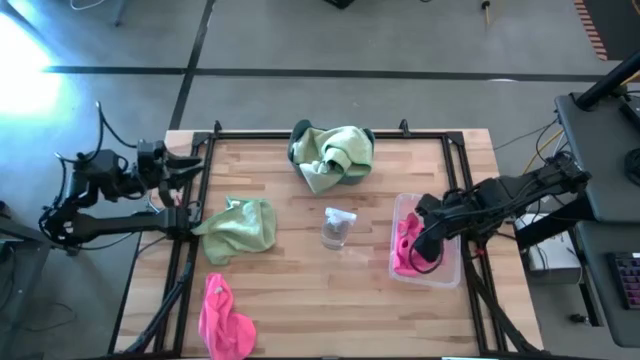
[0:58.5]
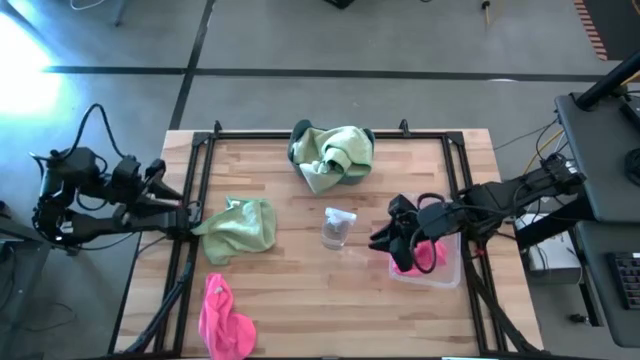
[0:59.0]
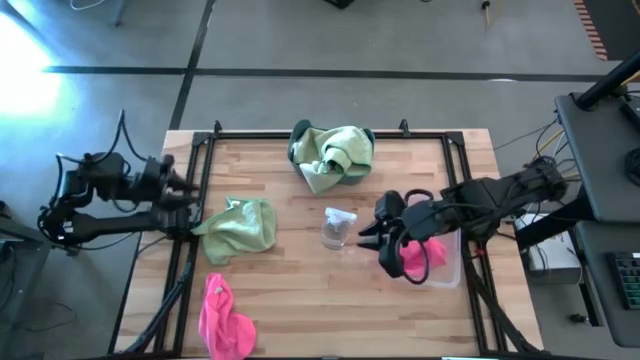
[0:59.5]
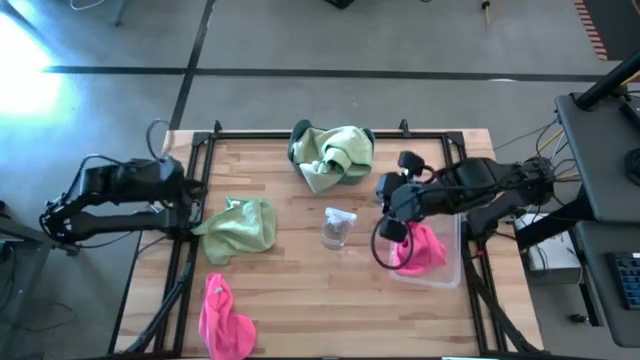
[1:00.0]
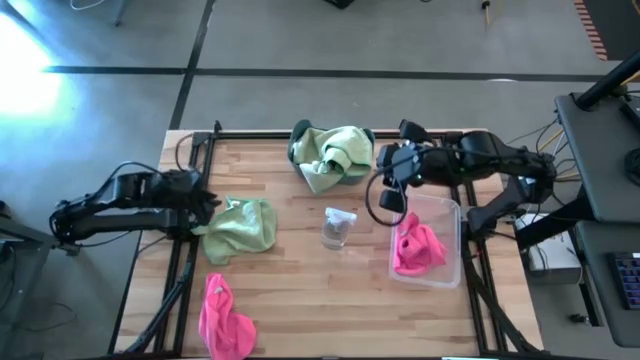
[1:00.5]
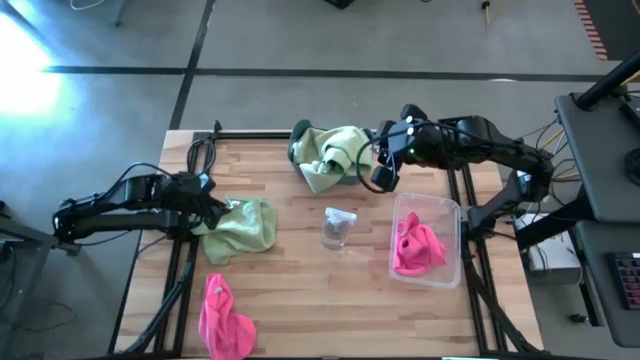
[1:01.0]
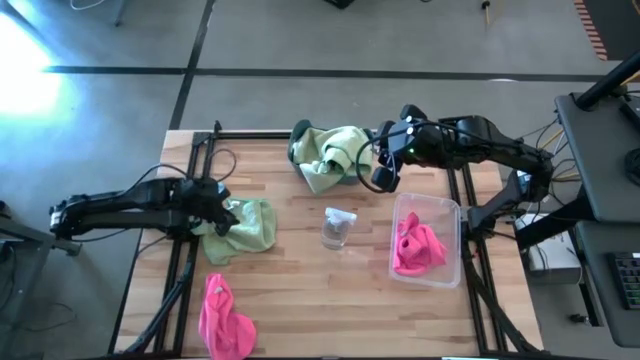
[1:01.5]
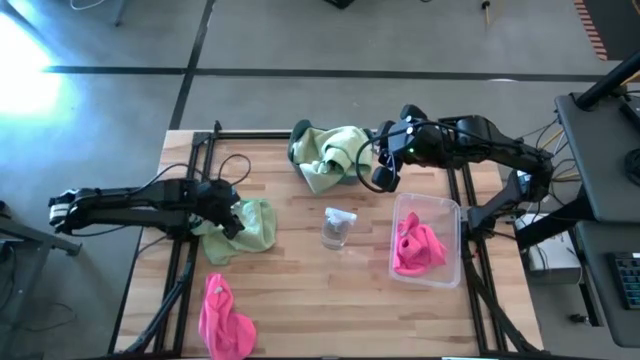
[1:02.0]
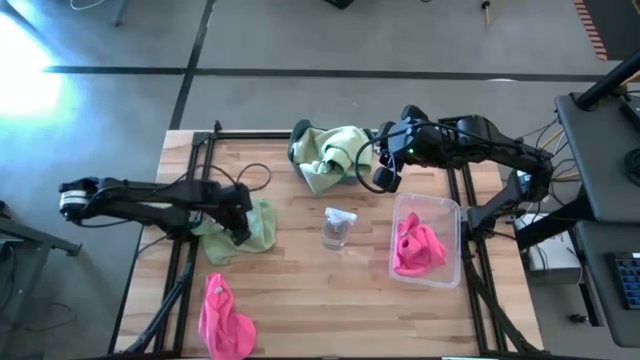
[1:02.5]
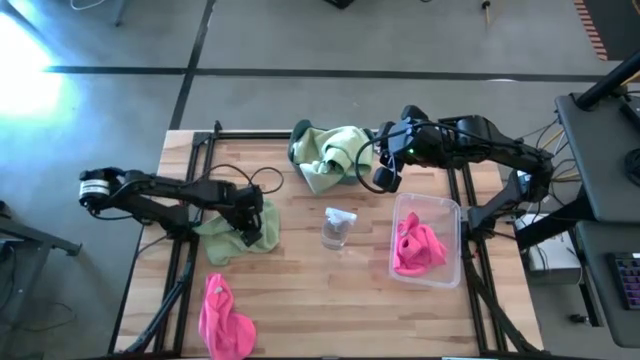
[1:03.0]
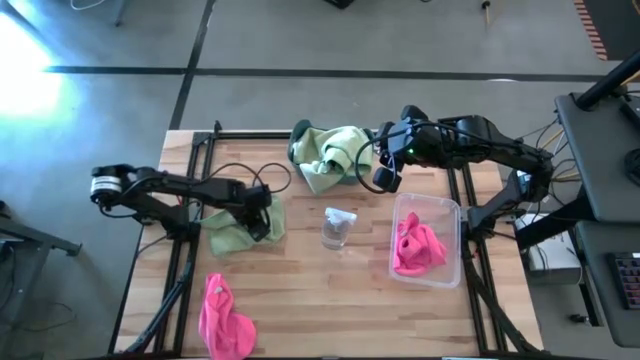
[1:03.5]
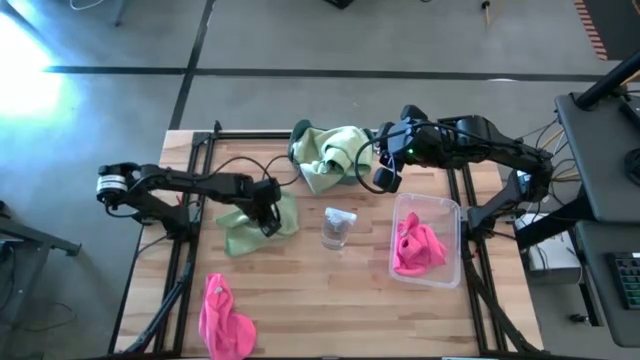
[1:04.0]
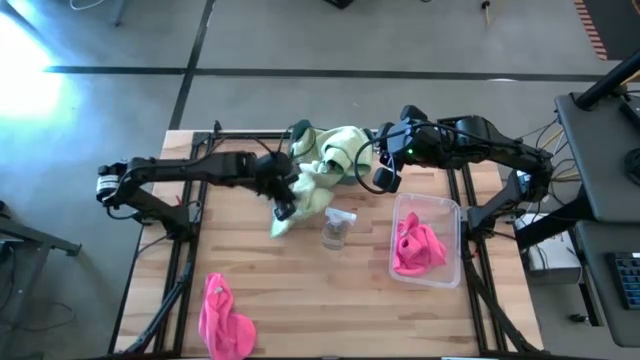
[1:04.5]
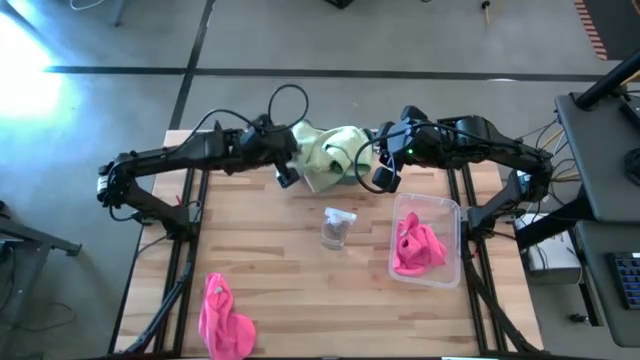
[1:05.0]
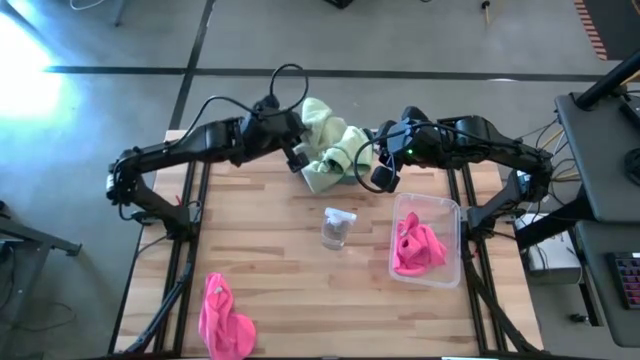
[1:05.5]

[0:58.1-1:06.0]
Task: Sort microfiber towel by color & place in baskets
Put the green microfiber towel into the blue bin

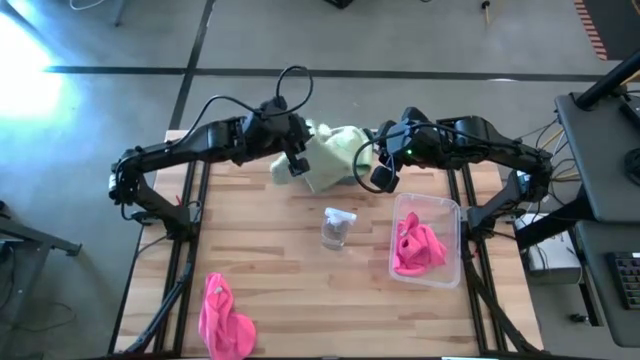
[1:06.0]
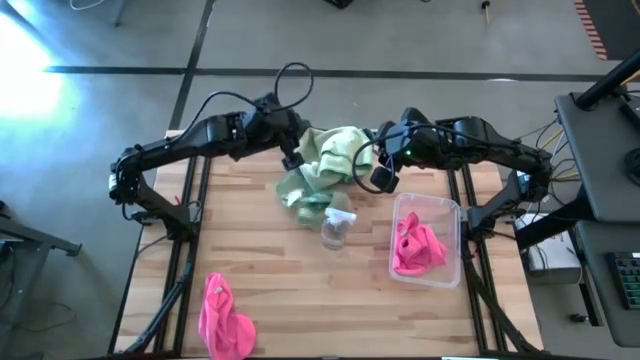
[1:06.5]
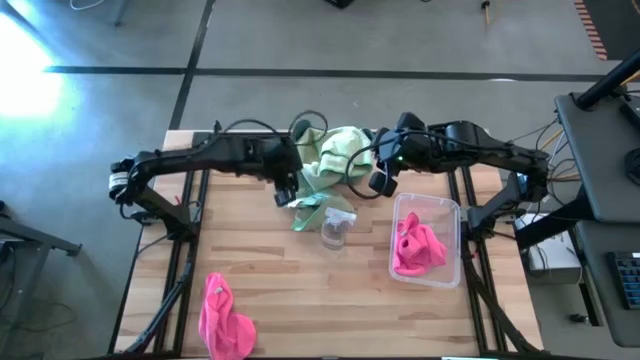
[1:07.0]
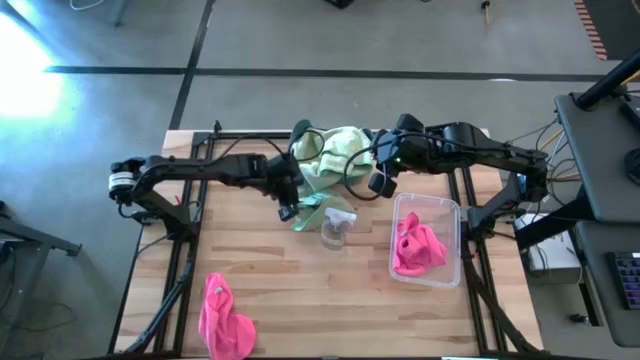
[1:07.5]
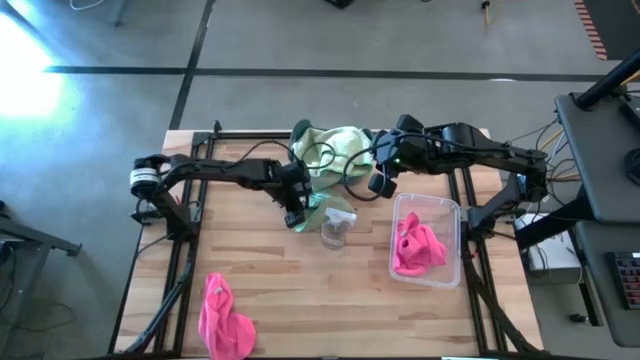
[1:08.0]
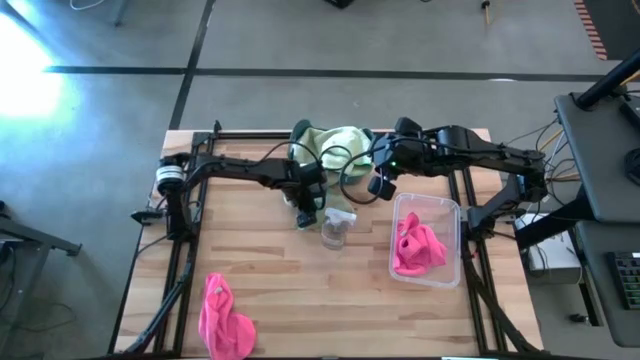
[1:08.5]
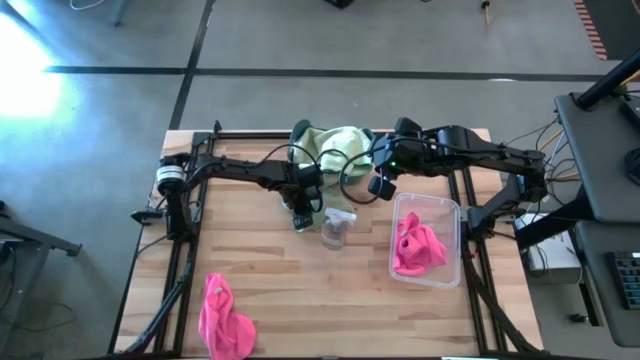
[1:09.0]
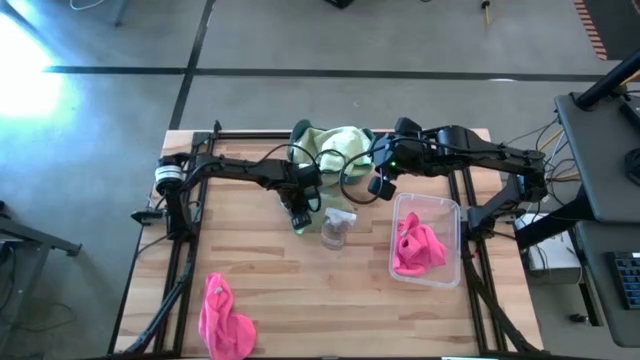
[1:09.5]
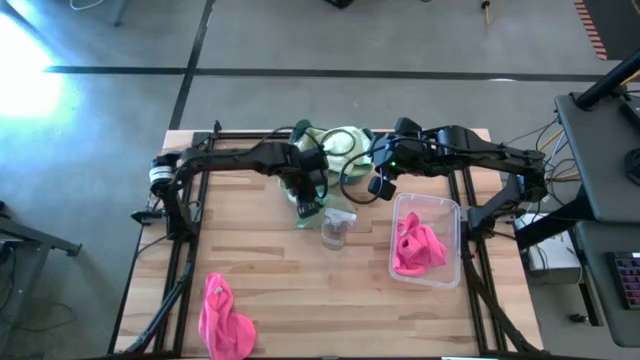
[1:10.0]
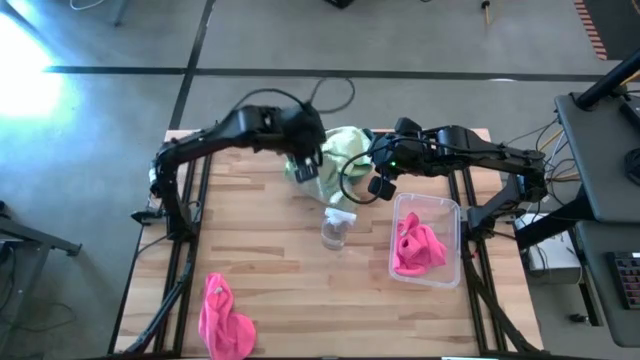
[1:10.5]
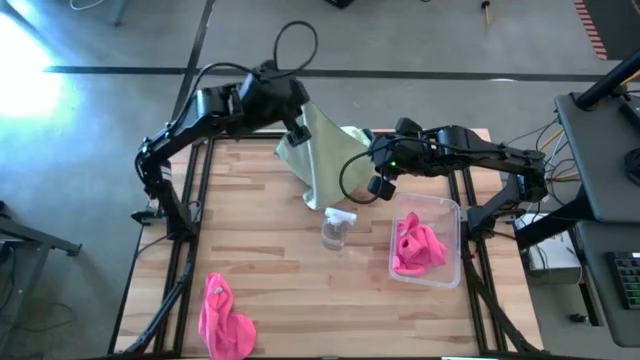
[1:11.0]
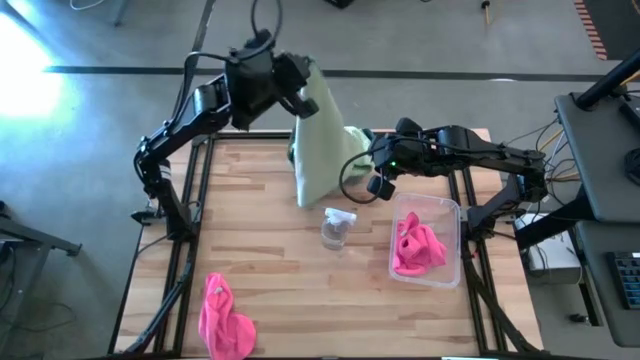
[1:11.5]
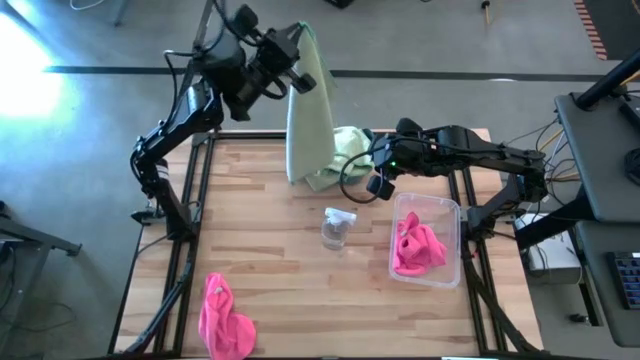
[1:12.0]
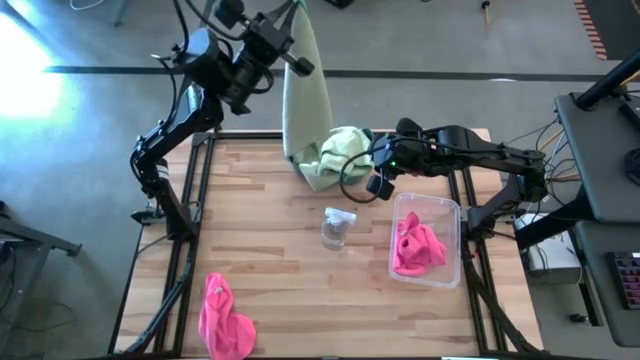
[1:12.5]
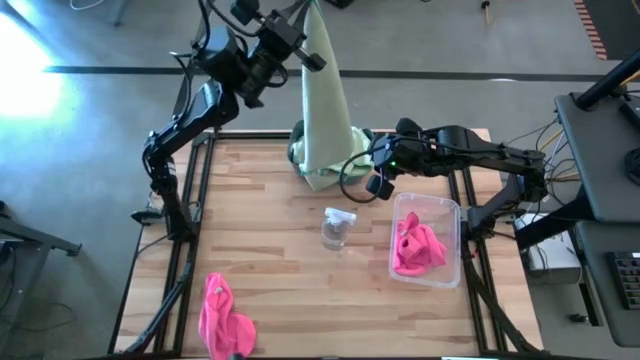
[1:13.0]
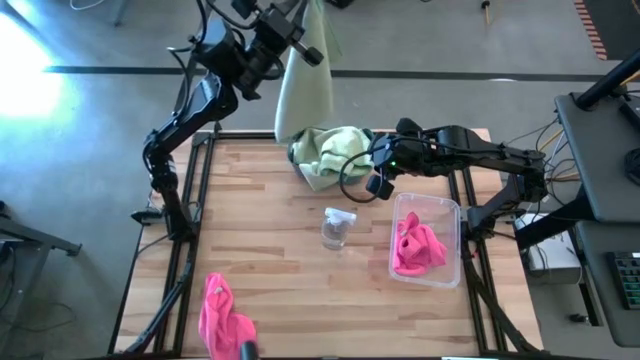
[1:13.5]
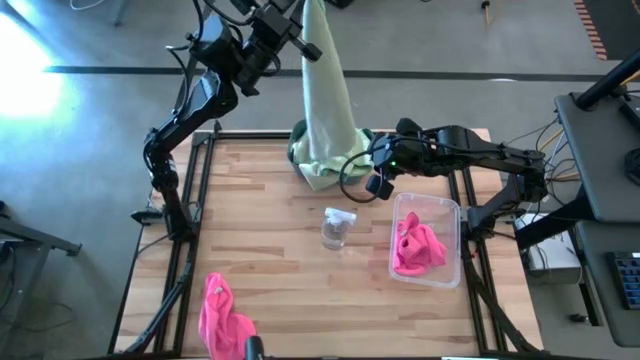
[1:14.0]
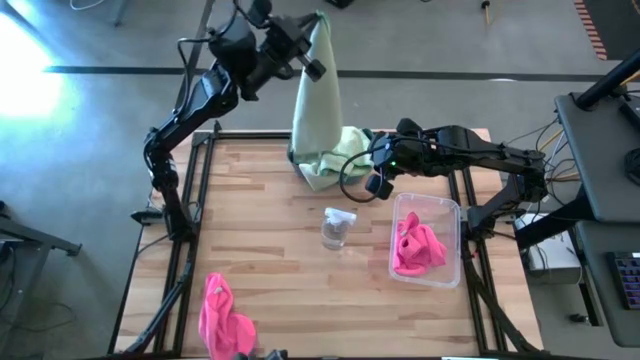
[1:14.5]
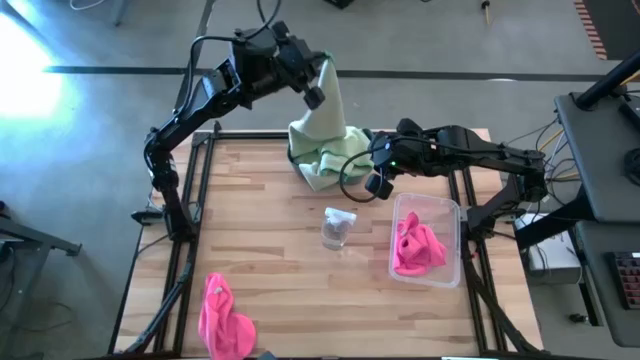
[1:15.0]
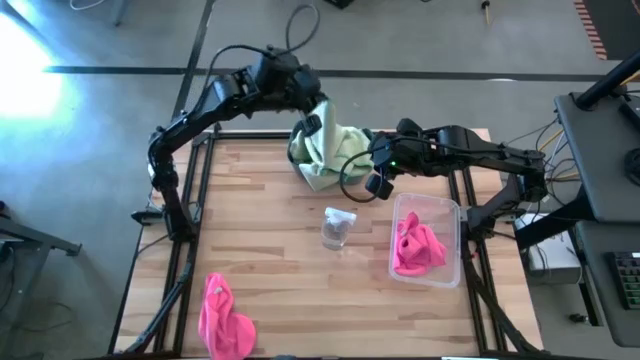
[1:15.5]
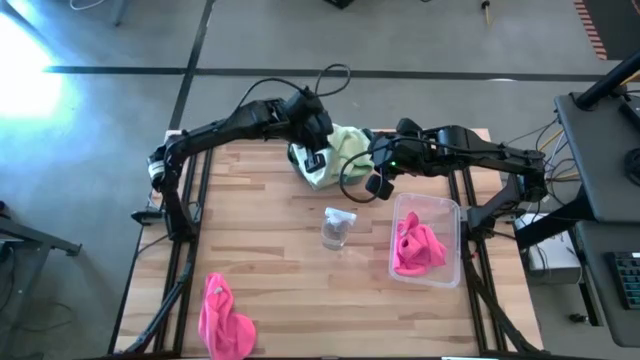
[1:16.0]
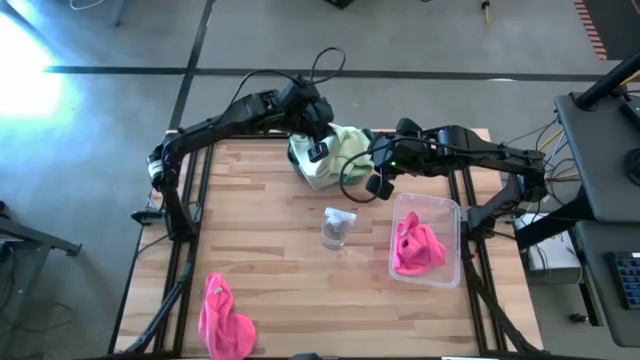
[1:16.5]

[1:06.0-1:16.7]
Put the green microfiber towel into the blue bin

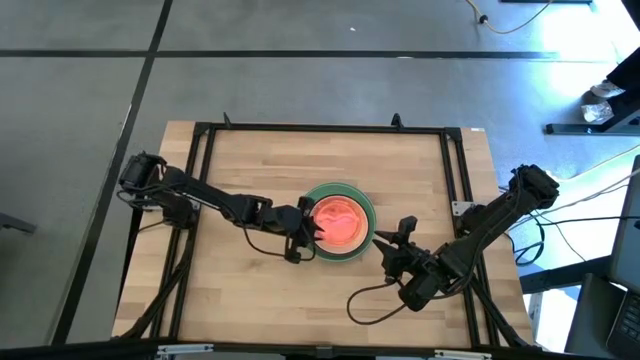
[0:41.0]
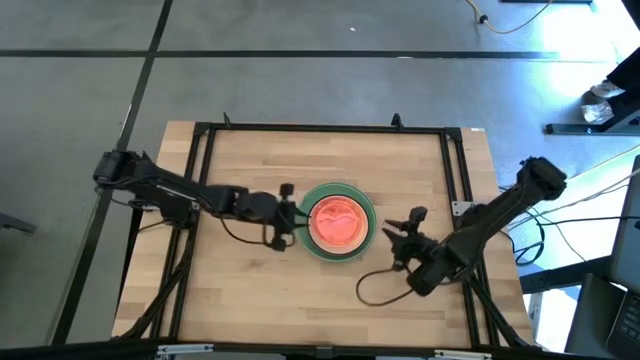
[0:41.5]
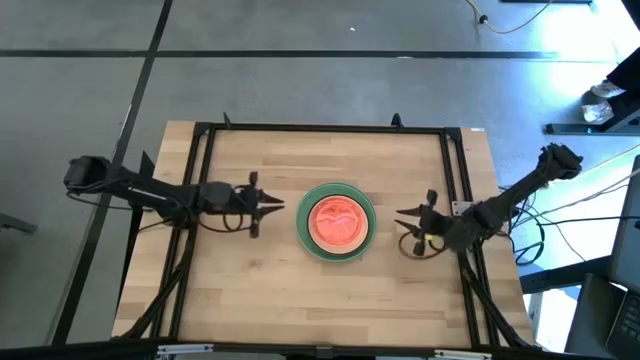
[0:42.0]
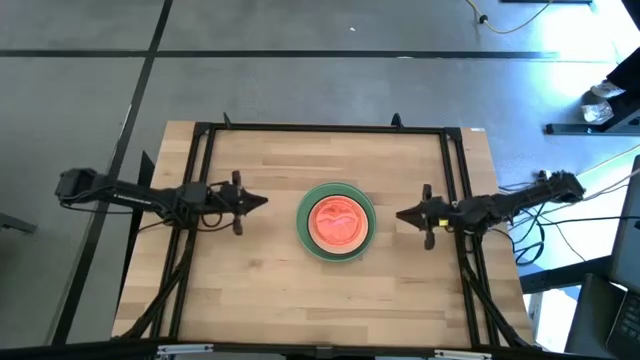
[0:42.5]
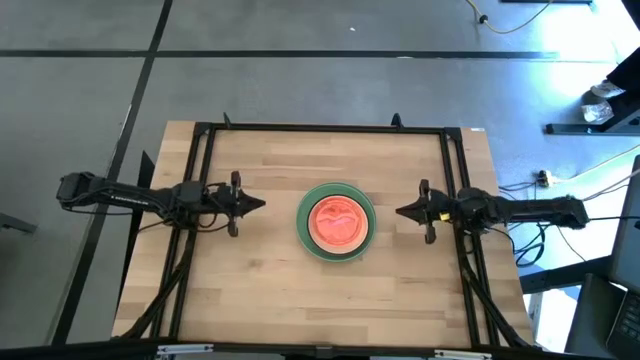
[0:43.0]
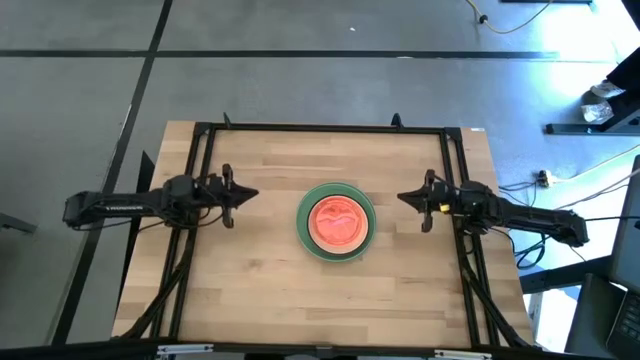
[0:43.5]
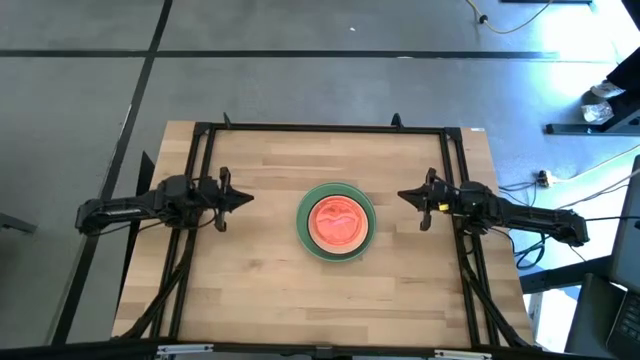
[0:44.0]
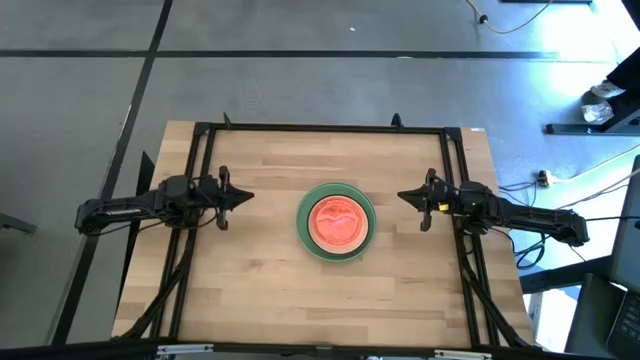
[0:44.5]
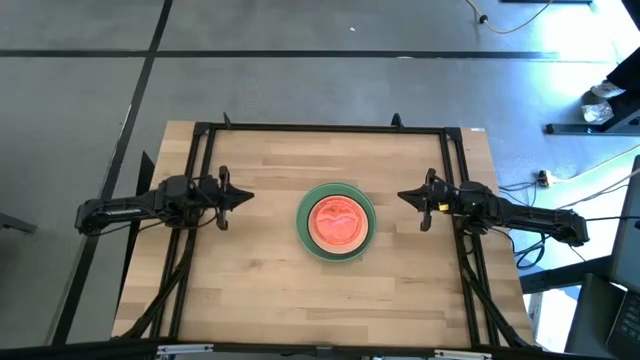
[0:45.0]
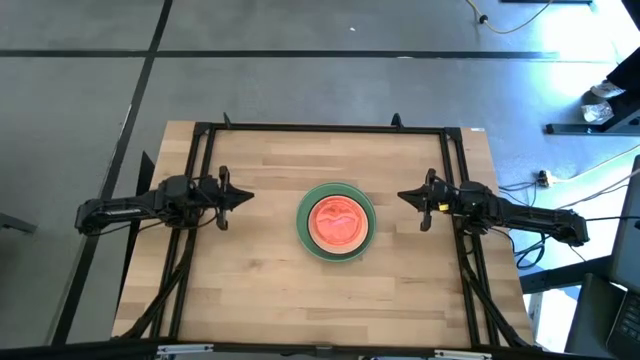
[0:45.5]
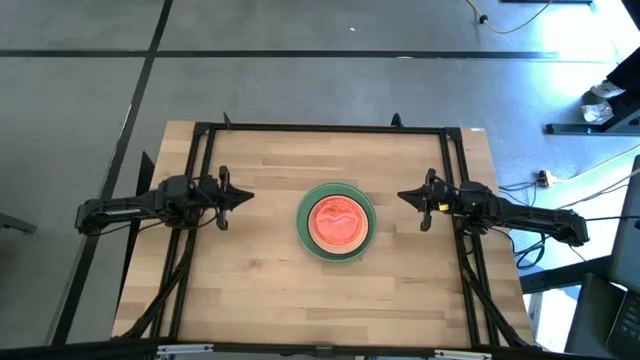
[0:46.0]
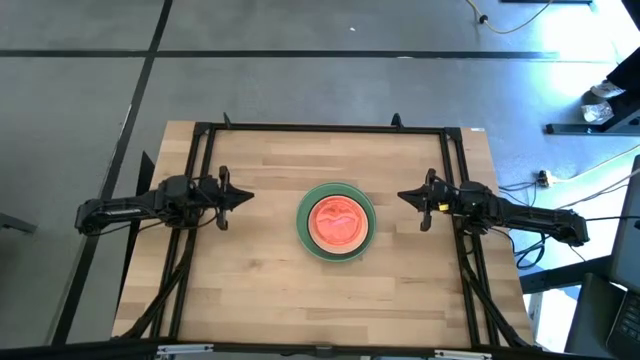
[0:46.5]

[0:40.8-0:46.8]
Task: Stack plastic plates
Return to Home Position
